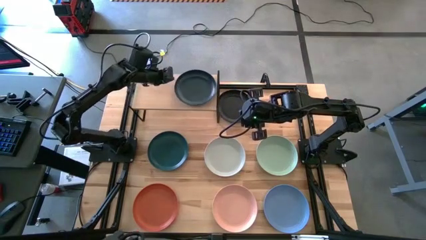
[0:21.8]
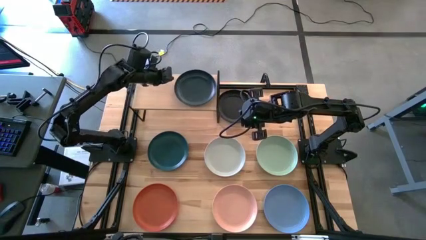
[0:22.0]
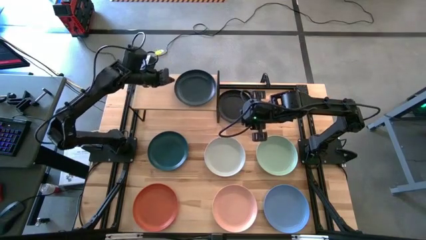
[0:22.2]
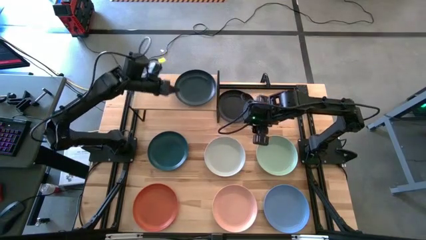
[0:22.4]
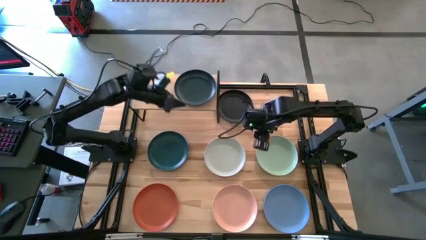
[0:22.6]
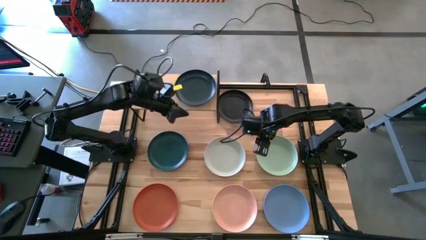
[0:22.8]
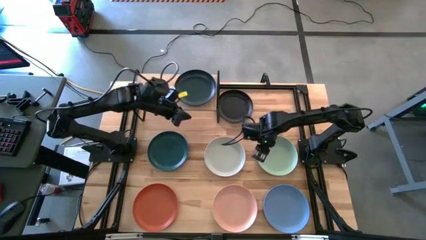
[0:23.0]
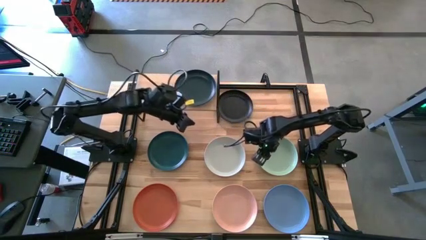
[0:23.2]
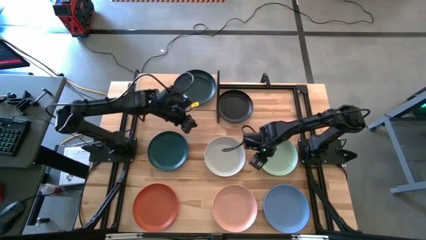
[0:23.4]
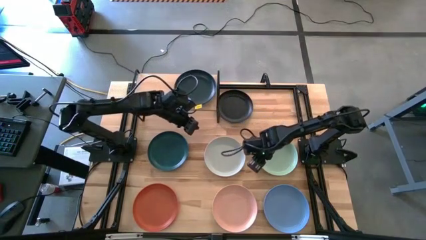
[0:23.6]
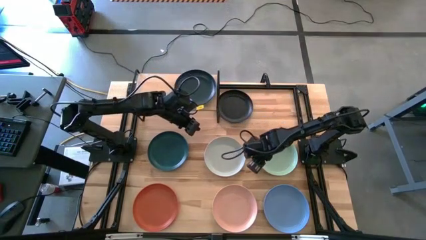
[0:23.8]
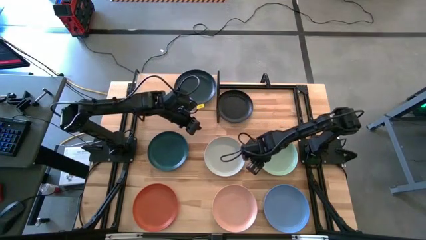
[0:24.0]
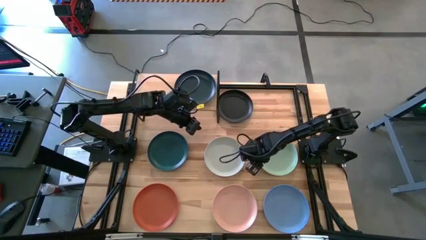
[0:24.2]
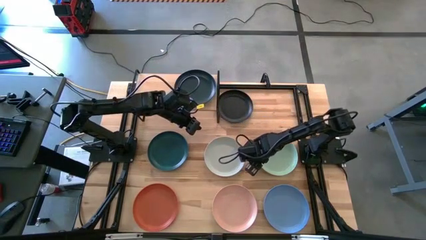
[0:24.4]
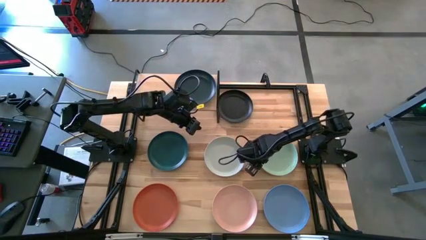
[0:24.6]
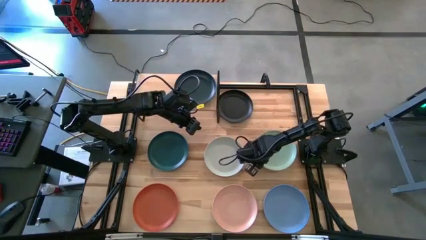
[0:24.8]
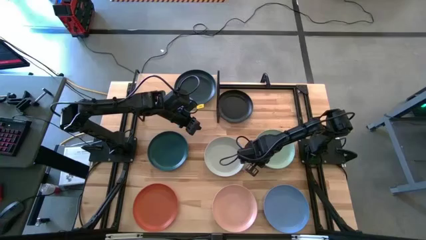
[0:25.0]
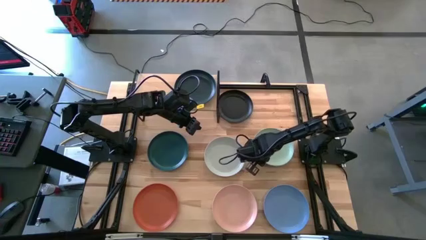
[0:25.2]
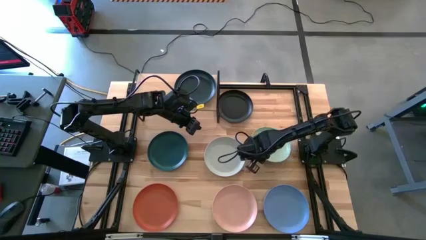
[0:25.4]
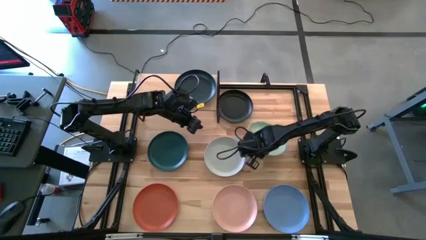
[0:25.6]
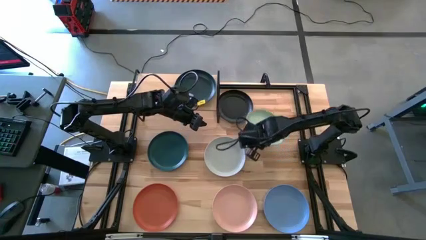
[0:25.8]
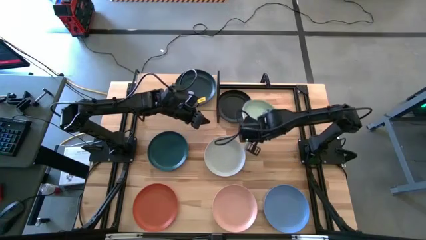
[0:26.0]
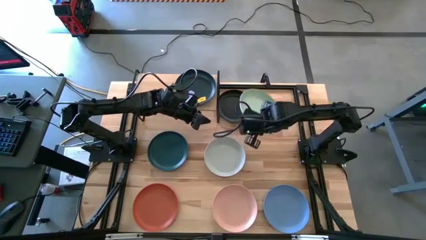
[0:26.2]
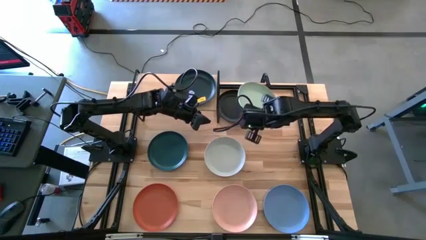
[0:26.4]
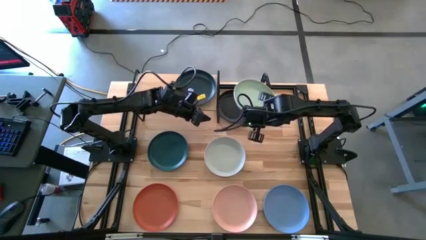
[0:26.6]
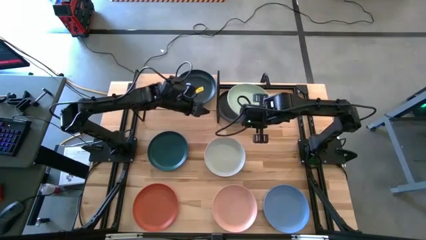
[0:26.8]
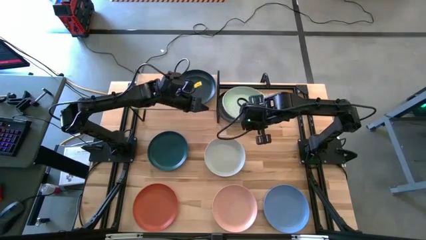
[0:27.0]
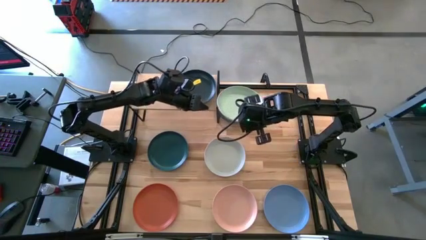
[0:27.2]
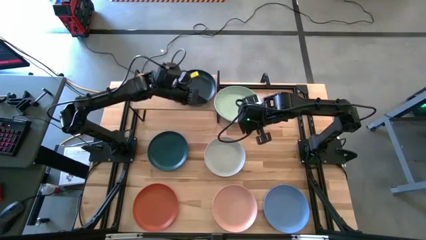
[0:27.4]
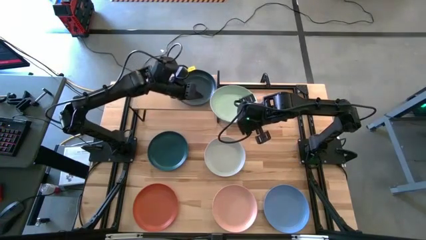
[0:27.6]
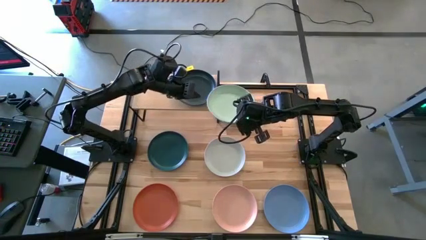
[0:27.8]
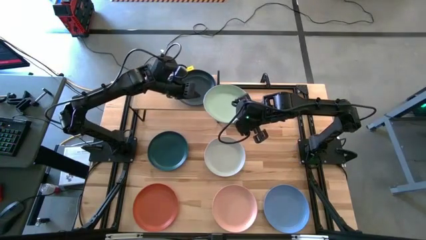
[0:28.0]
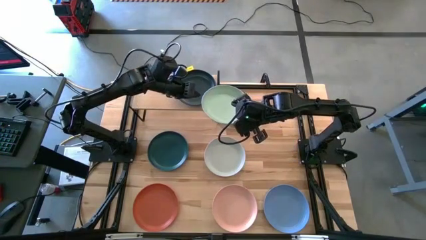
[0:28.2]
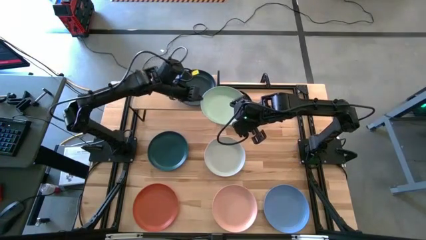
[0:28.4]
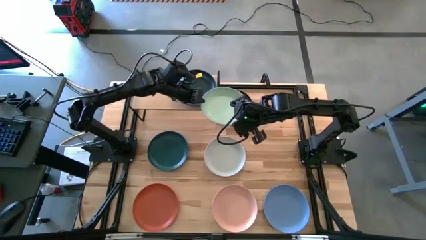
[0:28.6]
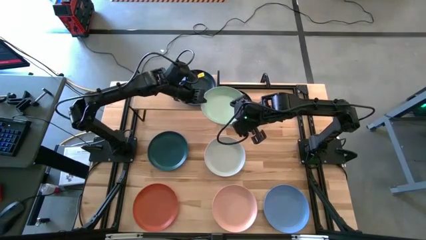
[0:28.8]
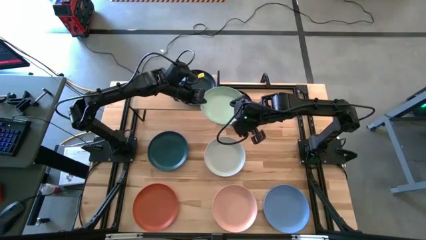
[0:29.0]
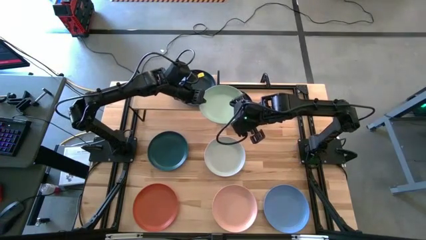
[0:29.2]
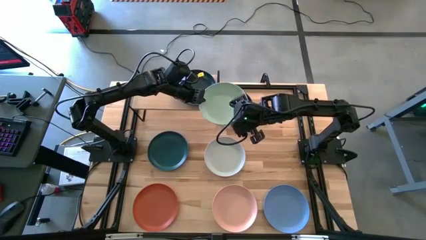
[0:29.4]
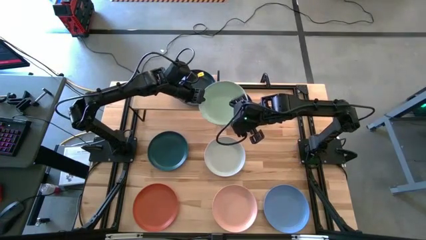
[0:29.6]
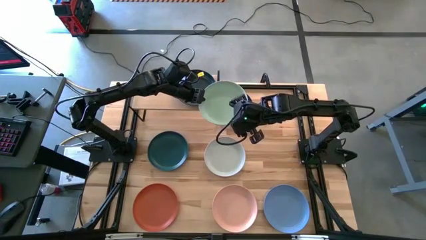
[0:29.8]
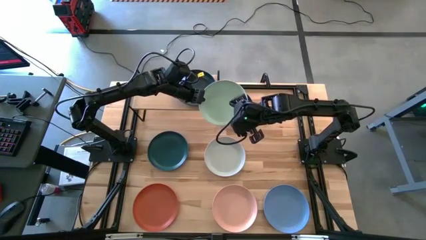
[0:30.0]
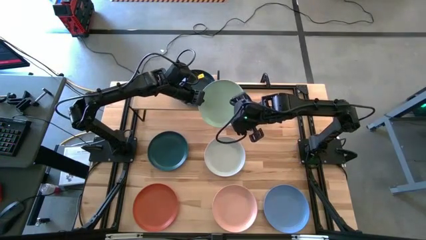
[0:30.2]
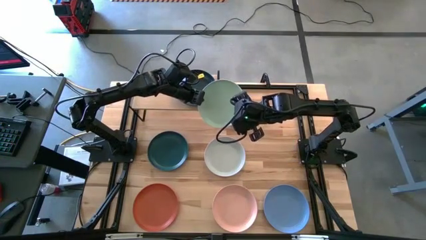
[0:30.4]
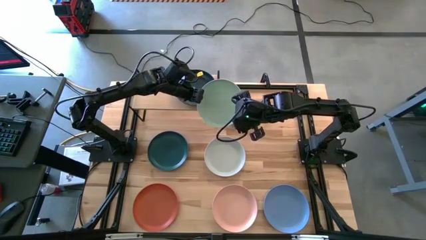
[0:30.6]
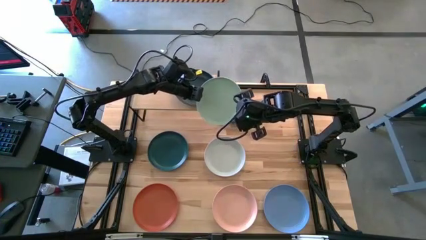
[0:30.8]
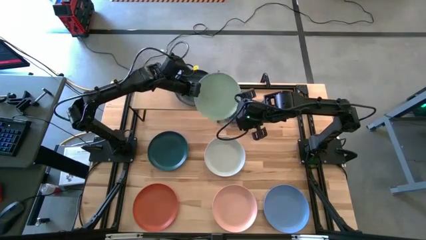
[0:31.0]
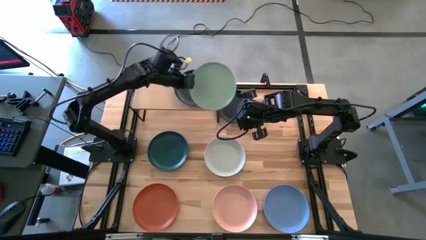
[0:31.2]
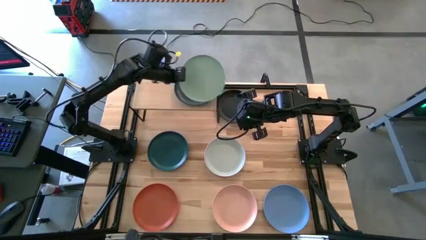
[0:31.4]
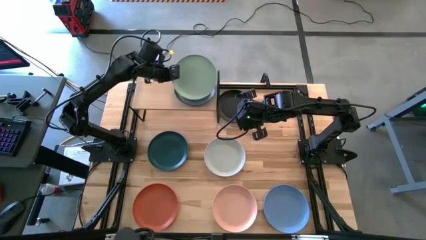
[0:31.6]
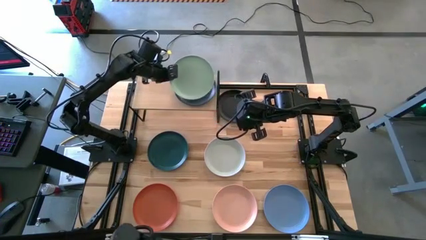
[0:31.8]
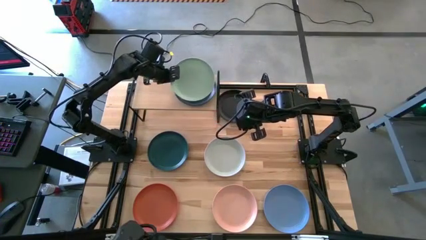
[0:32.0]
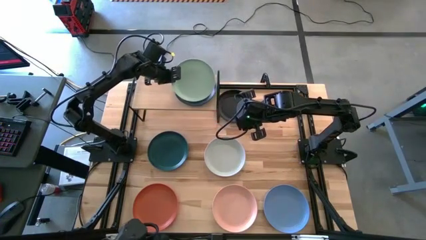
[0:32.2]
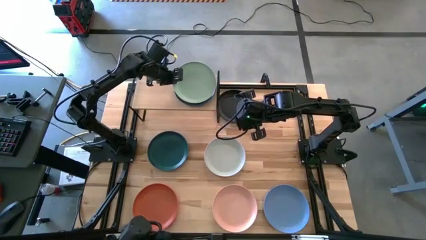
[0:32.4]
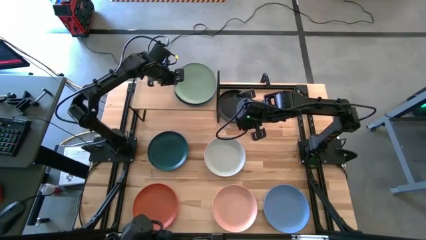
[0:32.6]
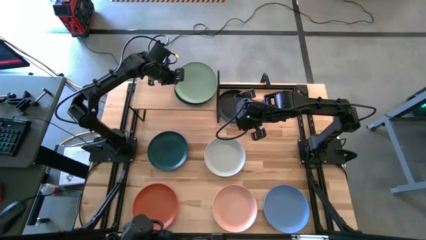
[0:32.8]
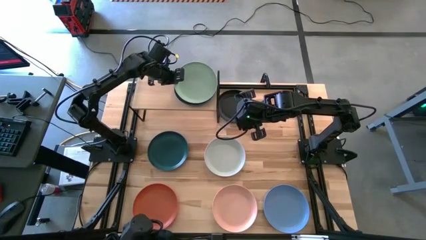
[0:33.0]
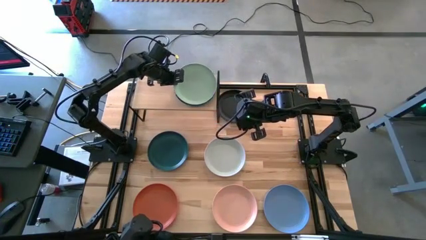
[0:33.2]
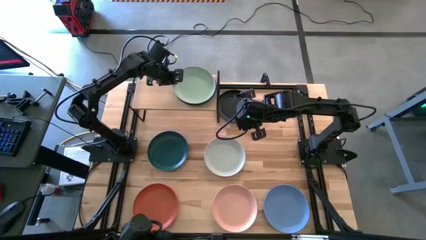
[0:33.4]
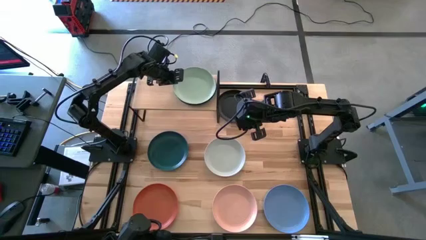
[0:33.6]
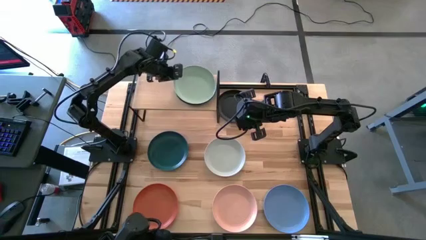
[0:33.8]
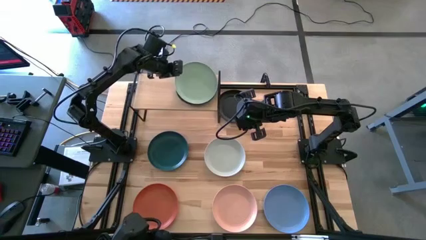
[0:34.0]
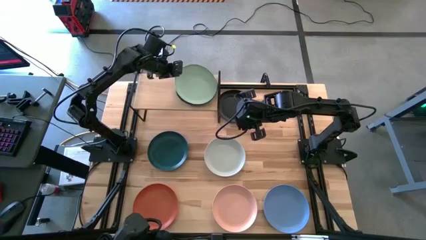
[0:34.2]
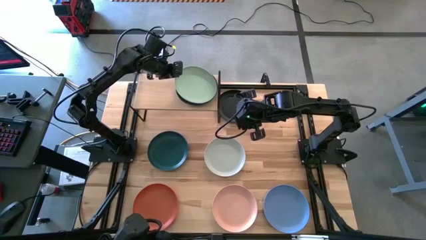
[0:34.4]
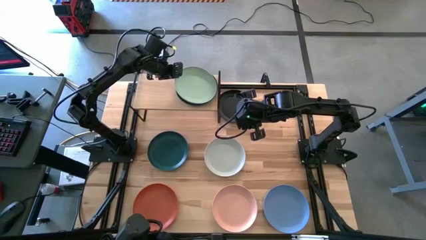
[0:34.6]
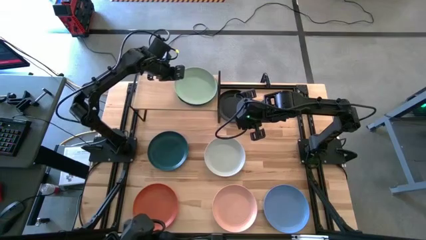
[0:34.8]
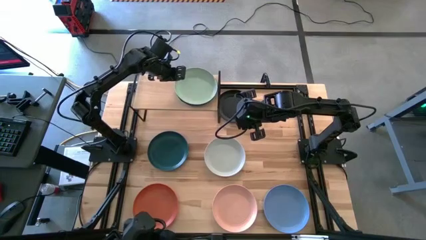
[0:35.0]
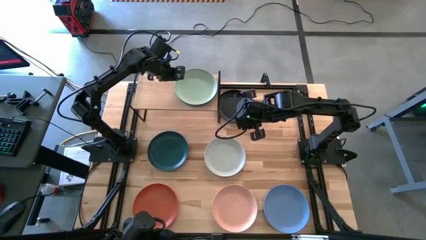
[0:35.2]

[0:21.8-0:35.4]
Task: Place and stack plates onto a shelf
Stack the green plate on top of the dark blue plate on the shelf
